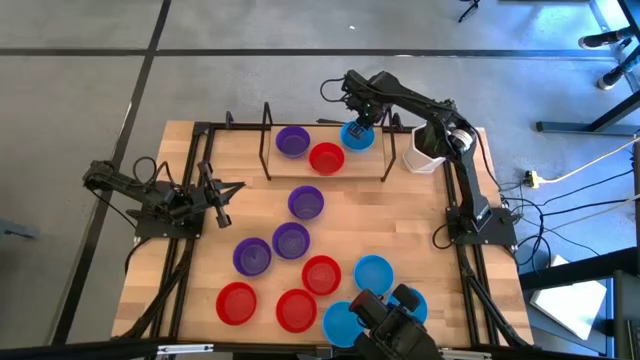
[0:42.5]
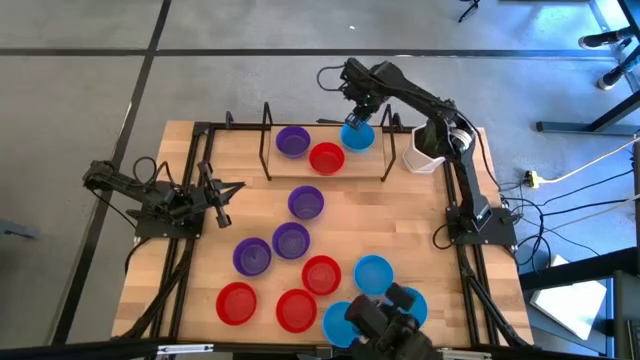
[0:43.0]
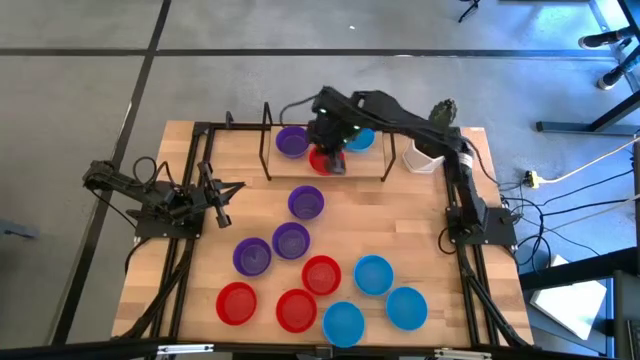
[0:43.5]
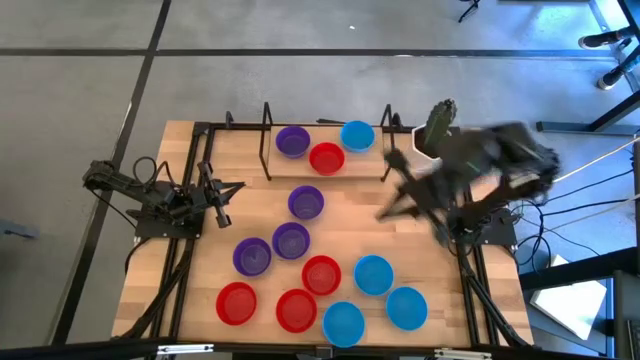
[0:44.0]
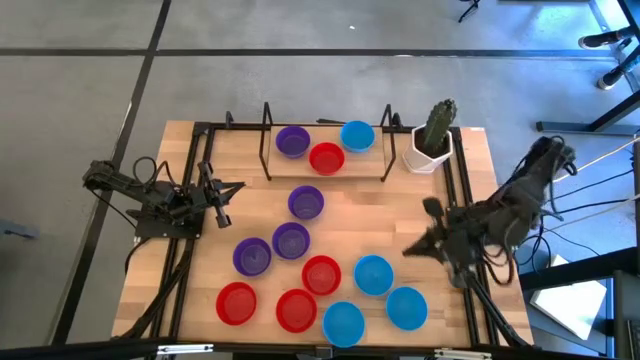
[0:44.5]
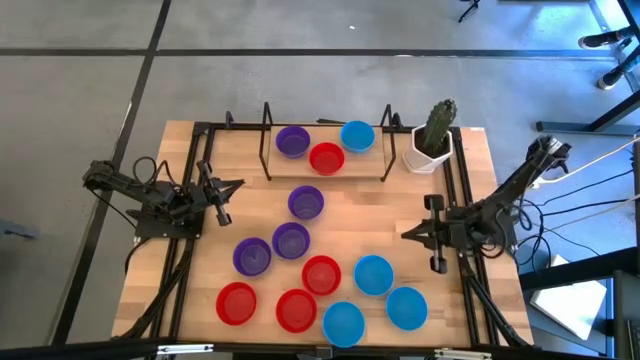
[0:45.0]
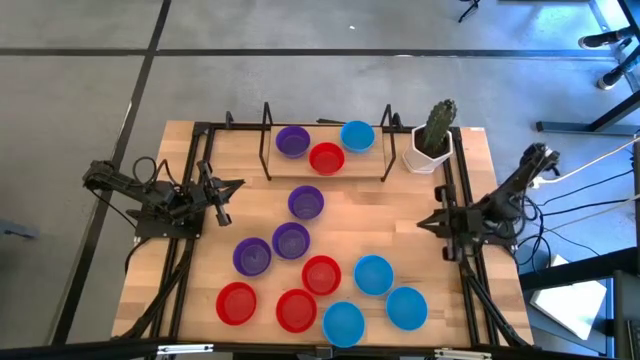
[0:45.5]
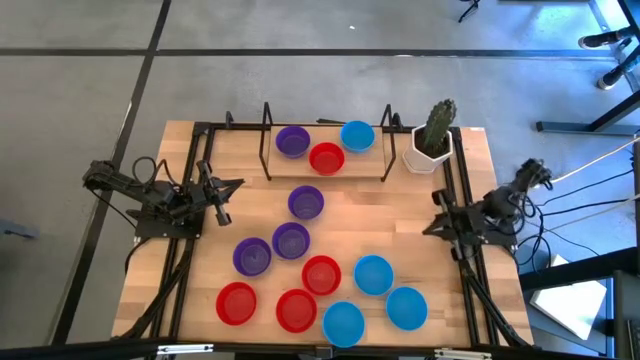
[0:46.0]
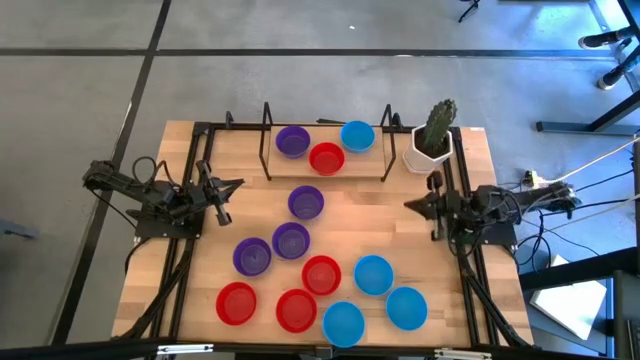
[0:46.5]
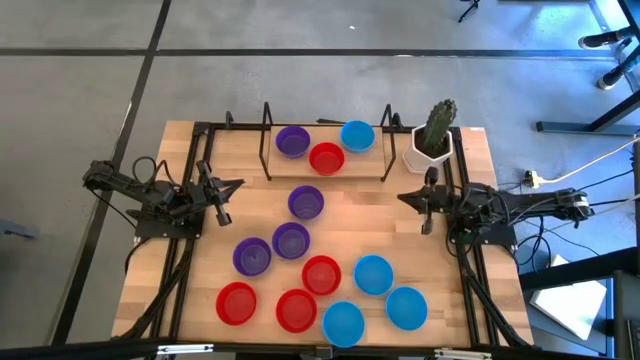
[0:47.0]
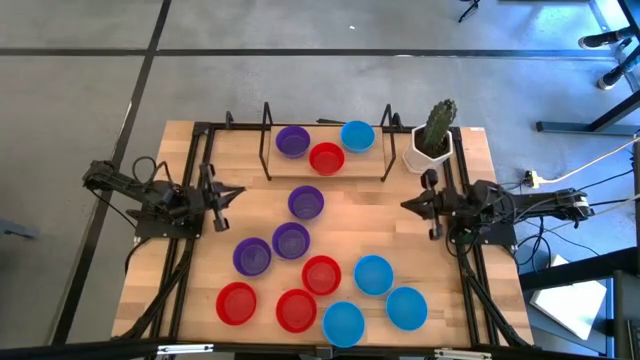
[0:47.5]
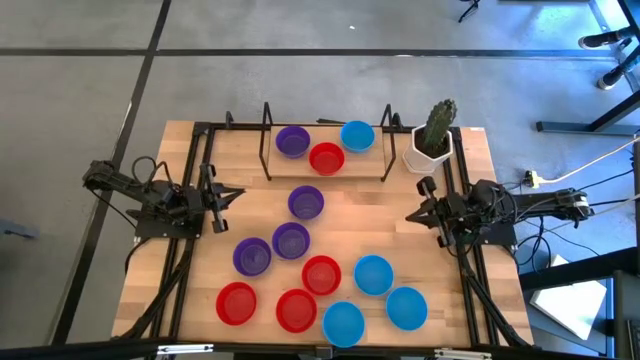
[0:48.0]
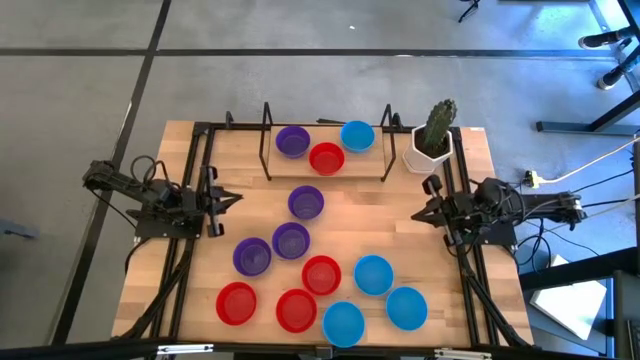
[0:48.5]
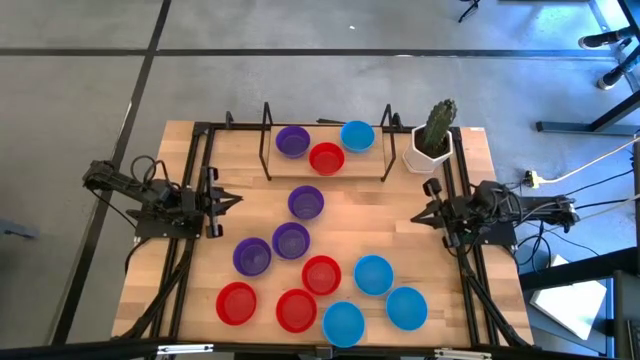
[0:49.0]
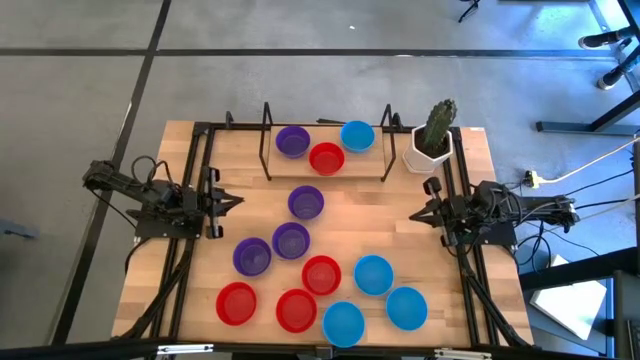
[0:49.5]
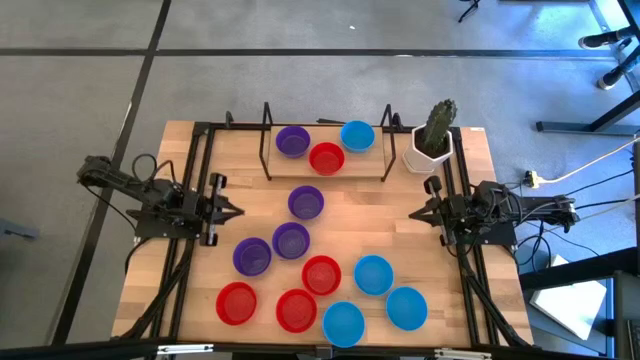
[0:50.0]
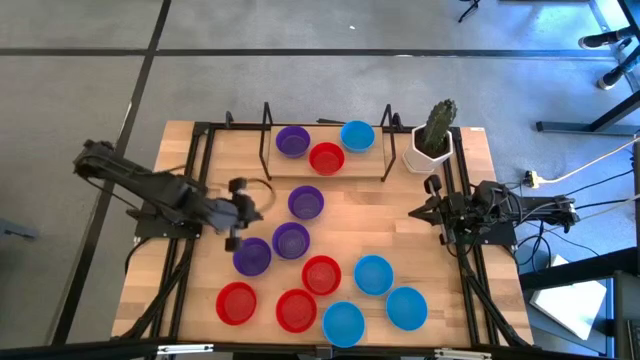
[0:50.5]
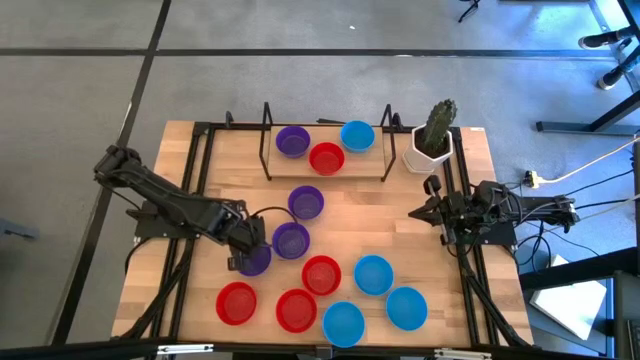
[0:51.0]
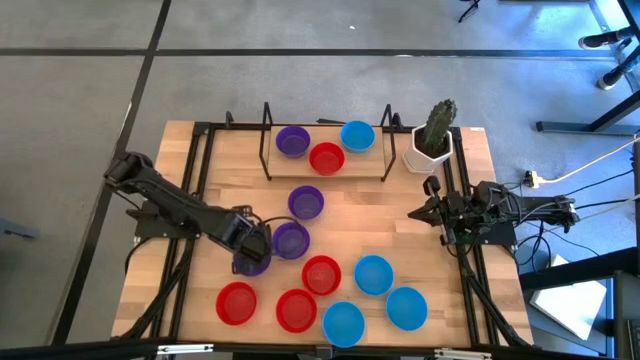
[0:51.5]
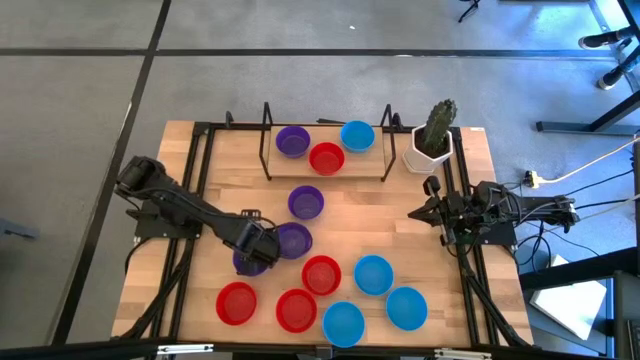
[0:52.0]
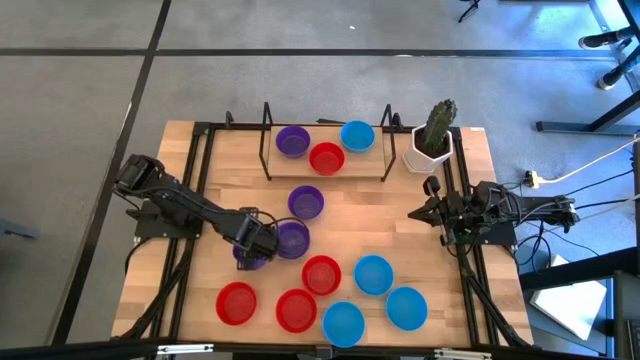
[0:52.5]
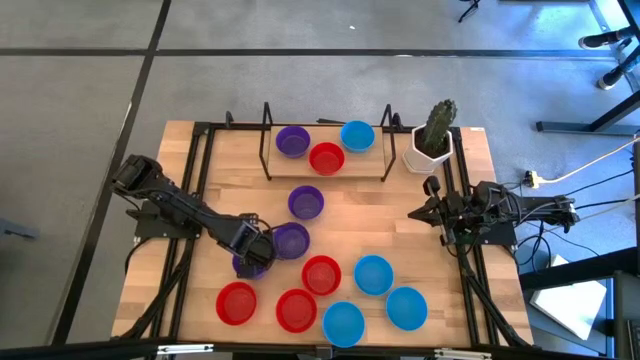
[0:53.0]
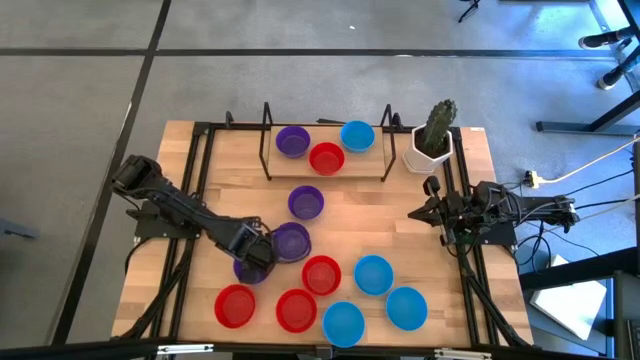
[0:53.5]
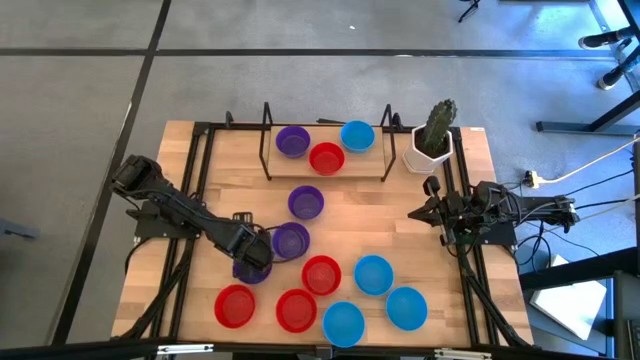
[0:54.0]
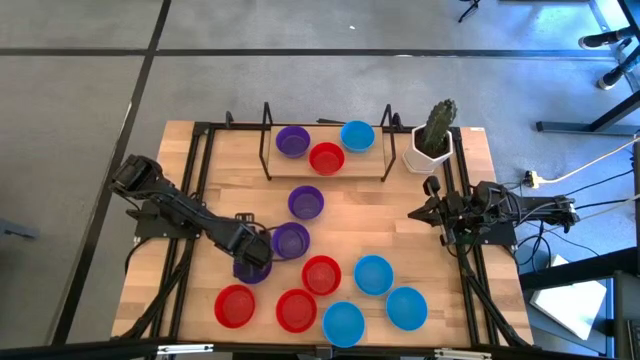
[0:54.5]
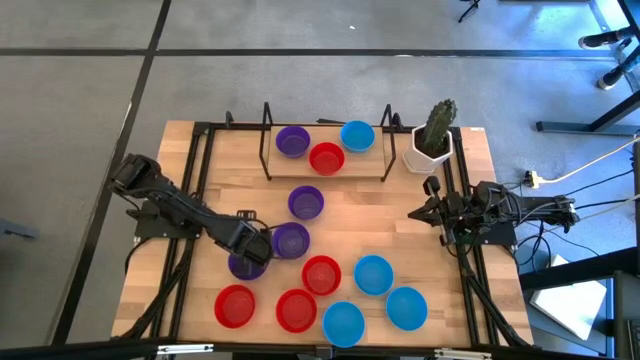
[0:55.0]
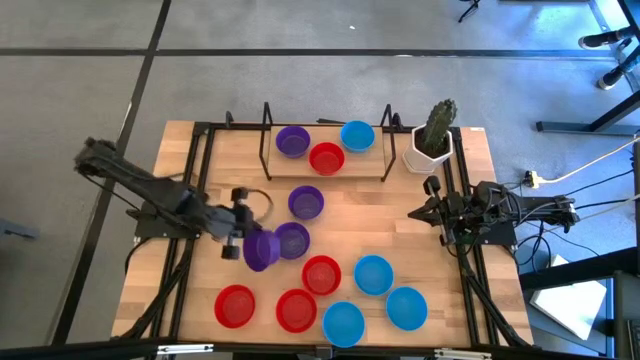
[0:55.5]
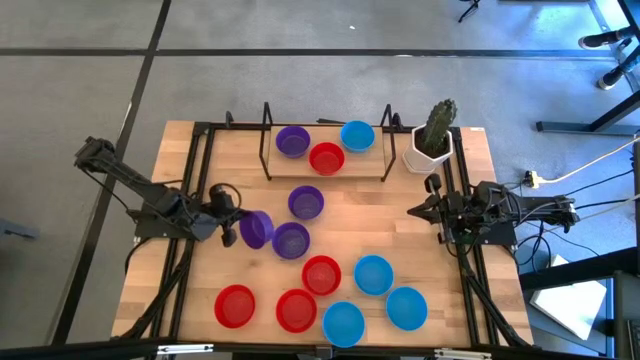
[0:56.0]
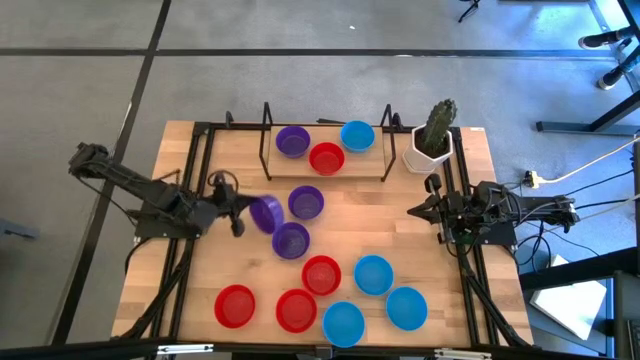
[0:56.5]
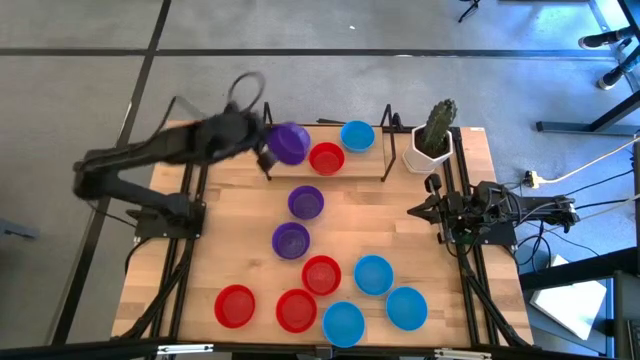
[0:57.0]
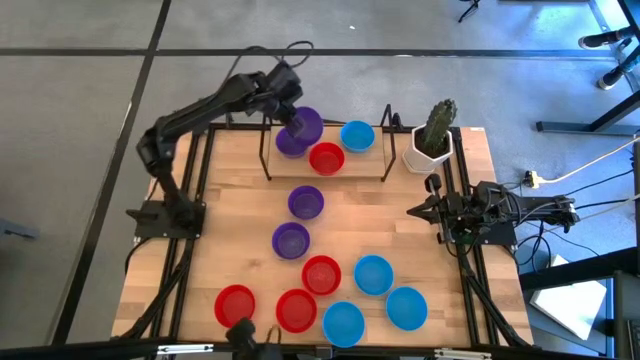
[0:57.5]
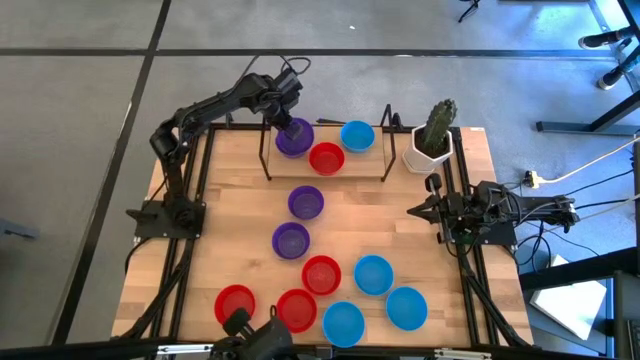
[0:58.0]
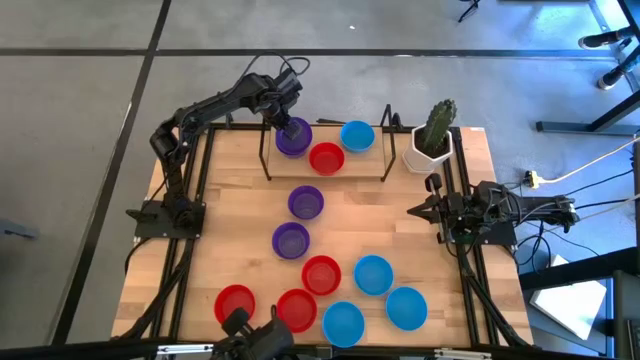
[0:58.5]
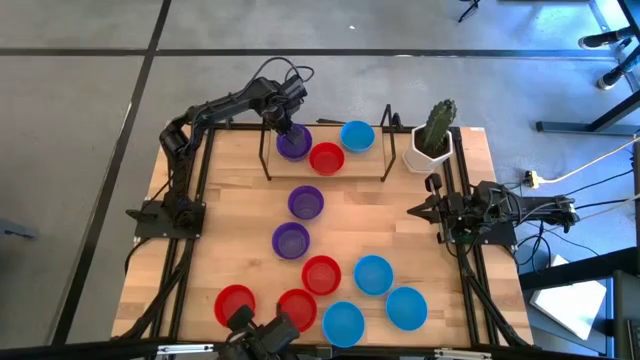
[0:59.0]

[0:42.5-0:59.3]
Task: Pick & Place Mini bowls
Stack the violet bowl on top of the violet bowl on the shelf

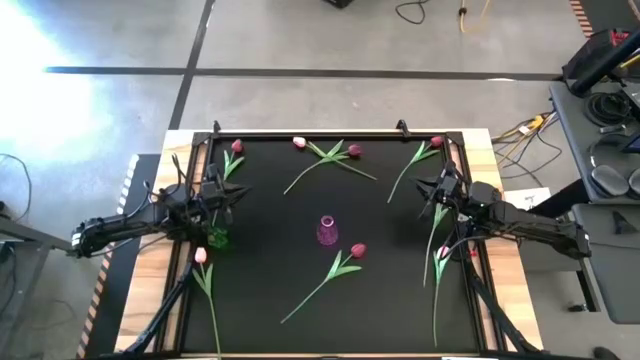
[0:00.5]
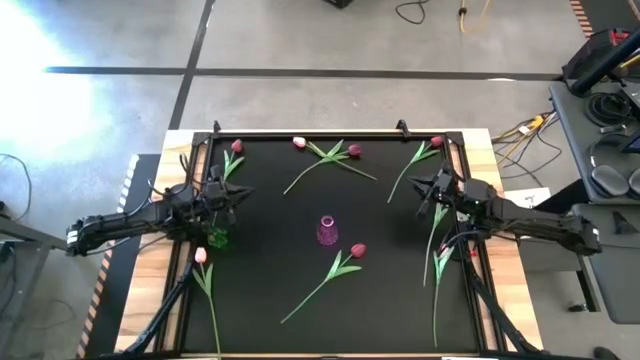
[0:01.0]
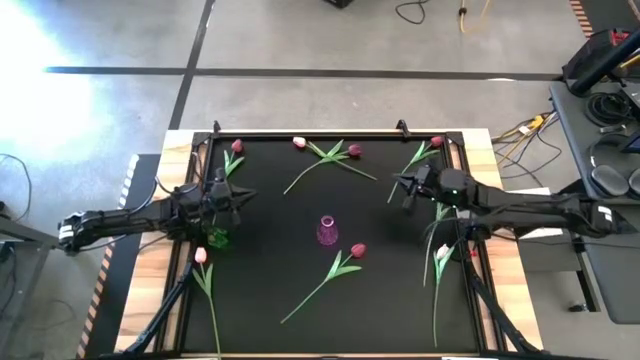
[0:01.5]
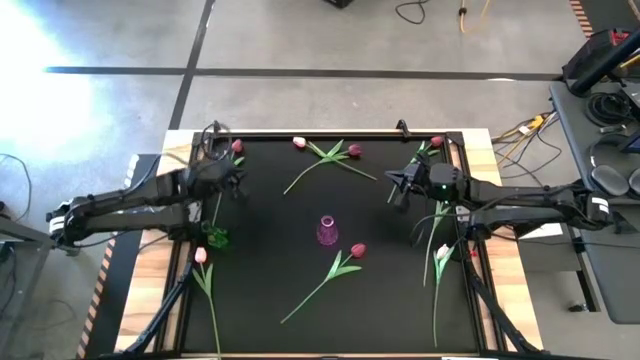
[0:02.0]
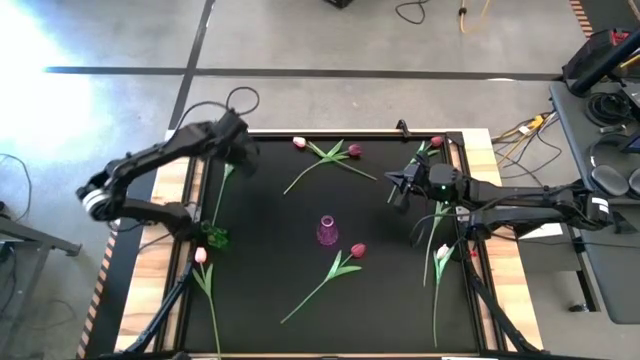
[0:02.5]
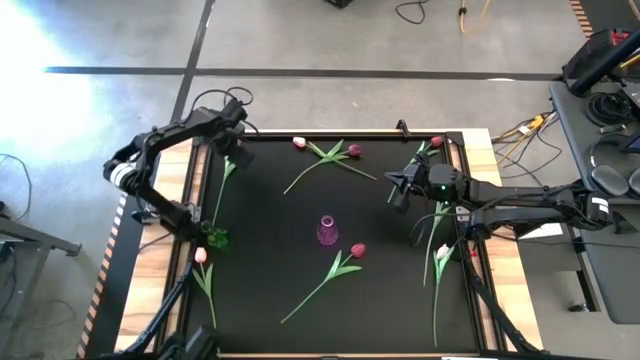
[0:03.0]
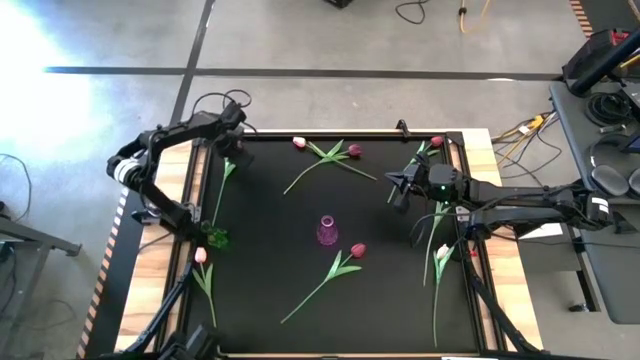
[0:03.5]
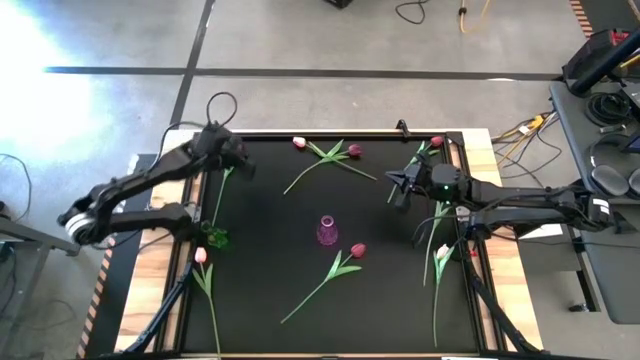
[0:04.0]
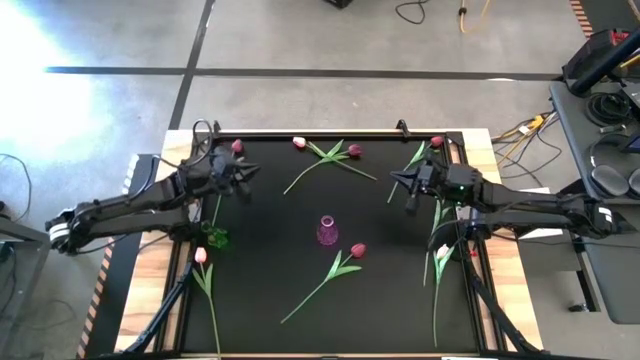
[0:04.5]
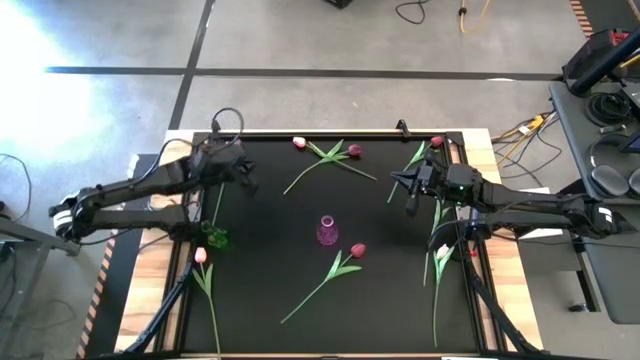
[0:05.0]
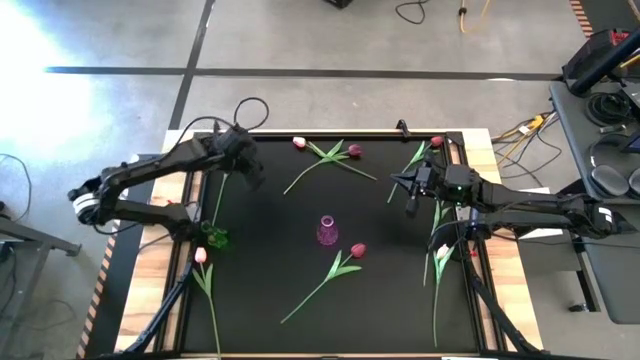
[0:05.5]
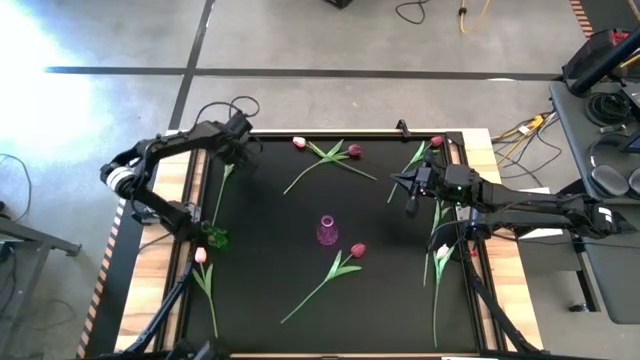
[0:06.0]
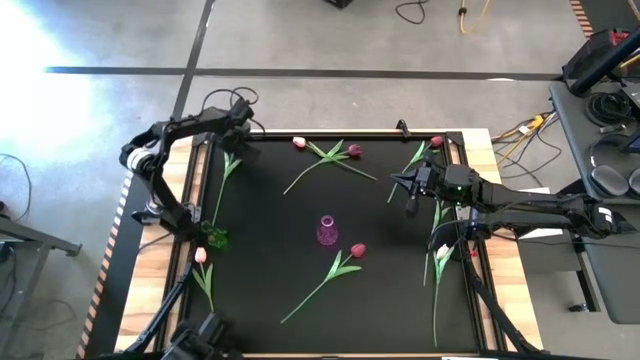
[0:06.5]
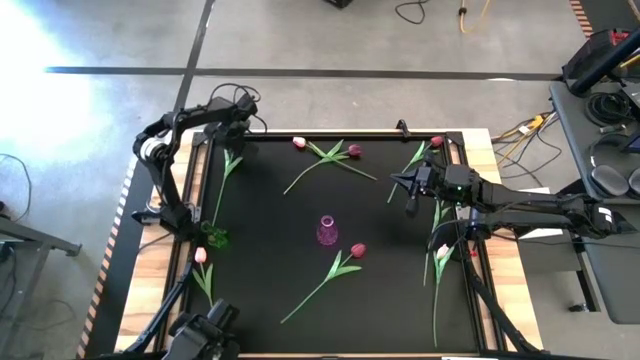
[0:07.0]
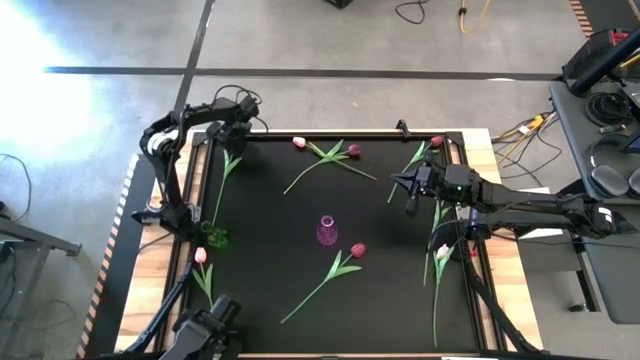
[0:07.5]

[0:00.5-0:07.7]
Task: Sort flowers into vase by color
Put the red tulip into the green vase
